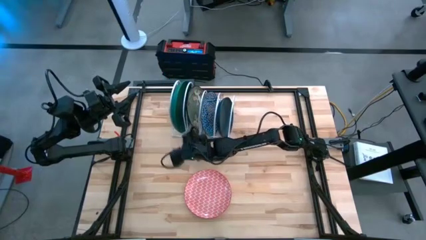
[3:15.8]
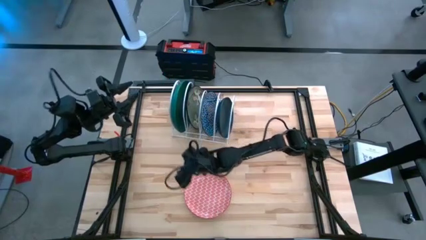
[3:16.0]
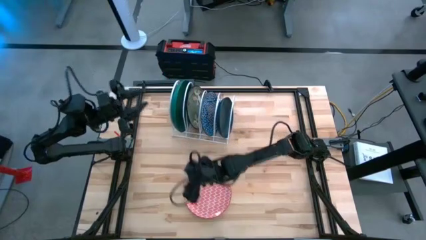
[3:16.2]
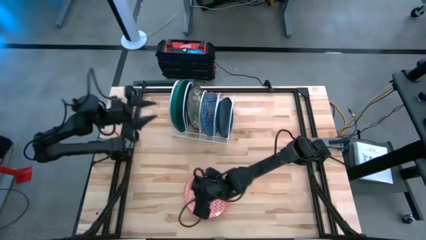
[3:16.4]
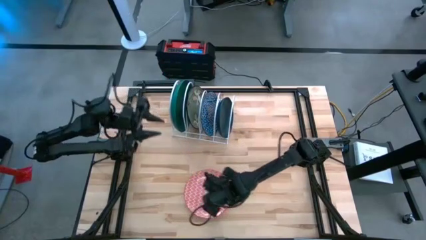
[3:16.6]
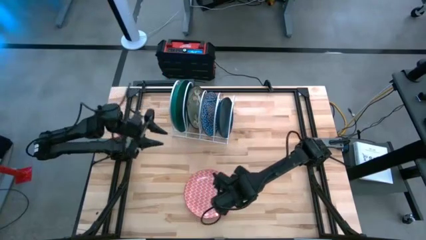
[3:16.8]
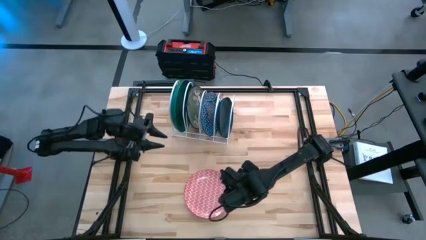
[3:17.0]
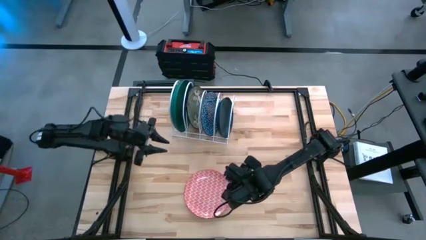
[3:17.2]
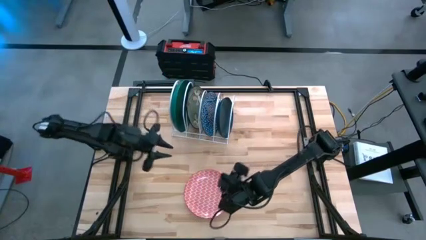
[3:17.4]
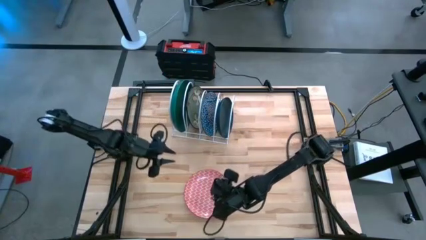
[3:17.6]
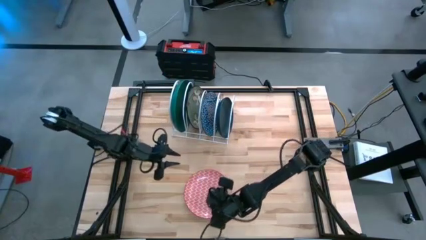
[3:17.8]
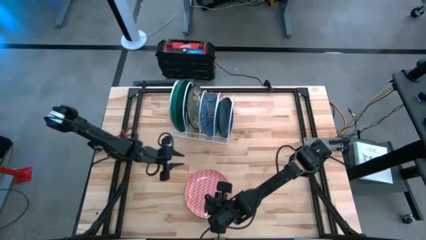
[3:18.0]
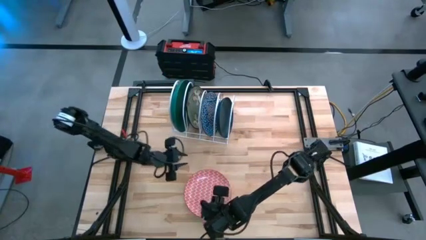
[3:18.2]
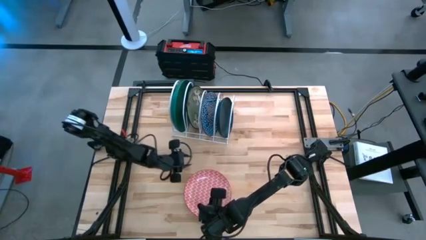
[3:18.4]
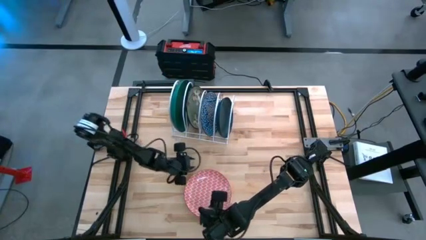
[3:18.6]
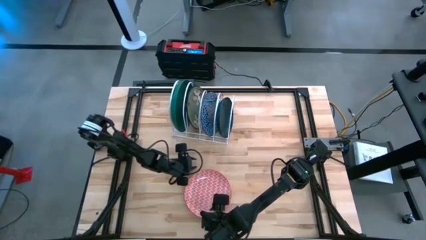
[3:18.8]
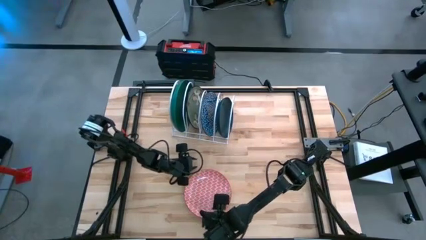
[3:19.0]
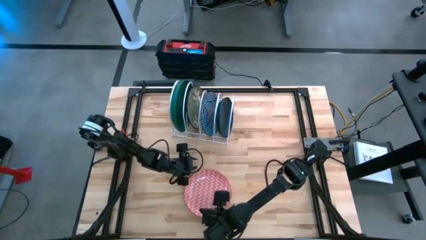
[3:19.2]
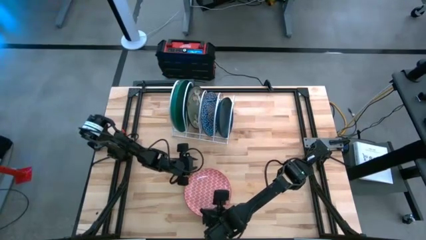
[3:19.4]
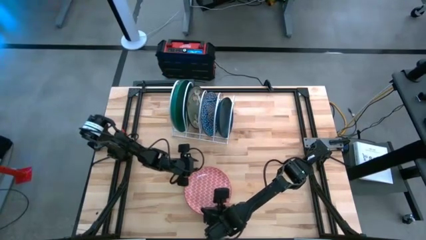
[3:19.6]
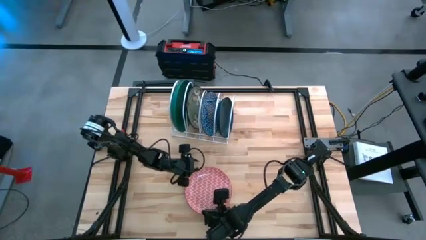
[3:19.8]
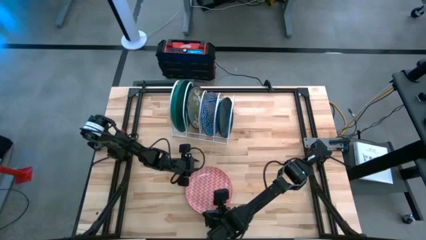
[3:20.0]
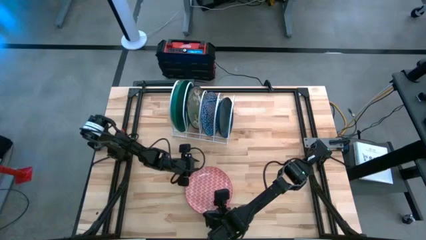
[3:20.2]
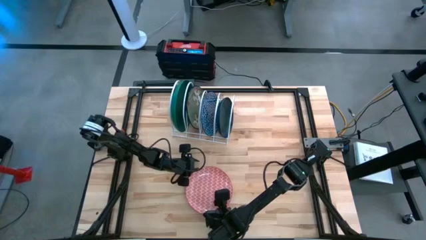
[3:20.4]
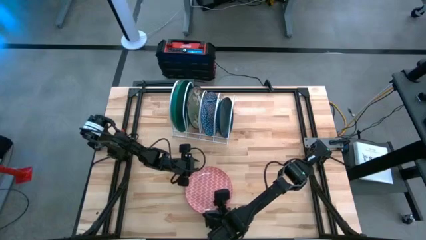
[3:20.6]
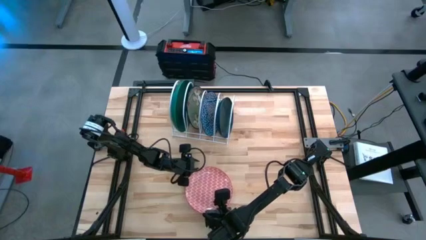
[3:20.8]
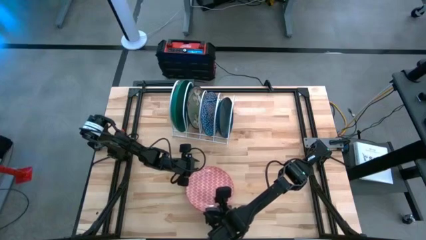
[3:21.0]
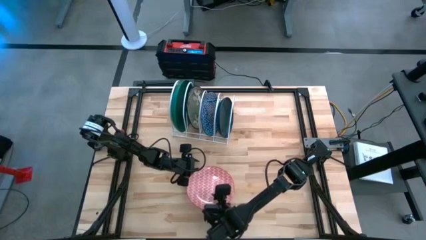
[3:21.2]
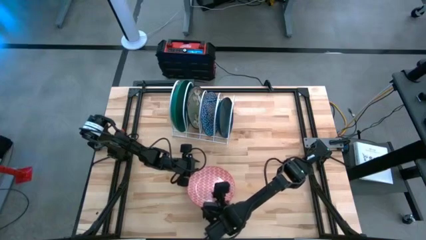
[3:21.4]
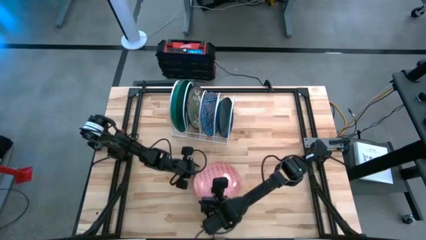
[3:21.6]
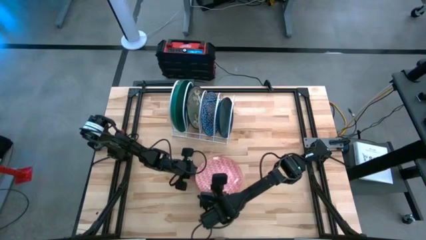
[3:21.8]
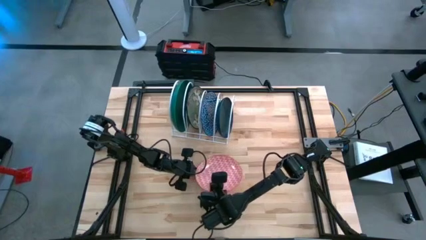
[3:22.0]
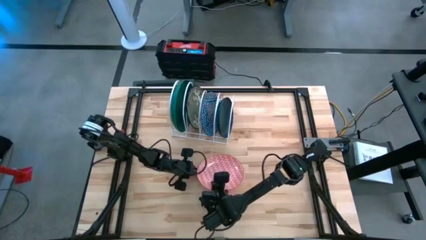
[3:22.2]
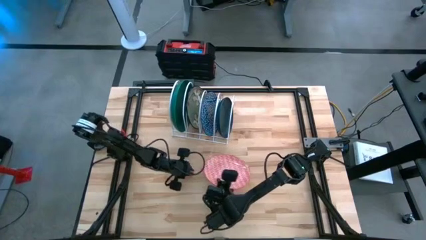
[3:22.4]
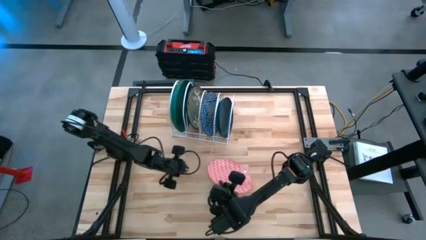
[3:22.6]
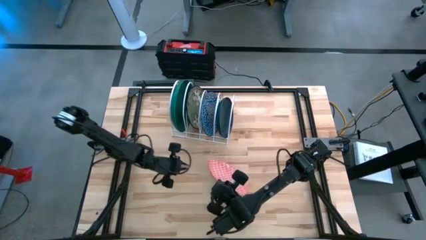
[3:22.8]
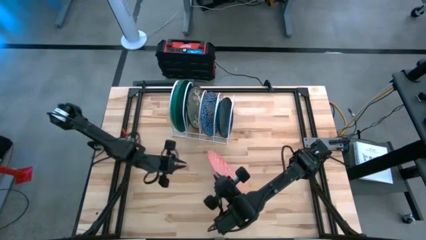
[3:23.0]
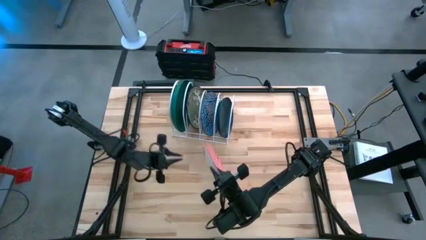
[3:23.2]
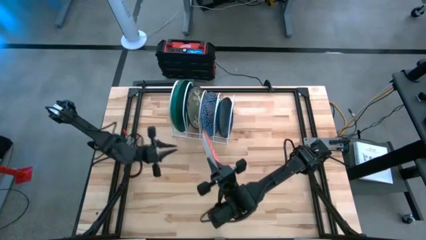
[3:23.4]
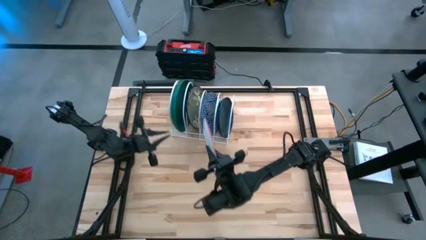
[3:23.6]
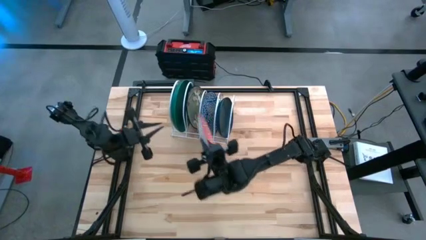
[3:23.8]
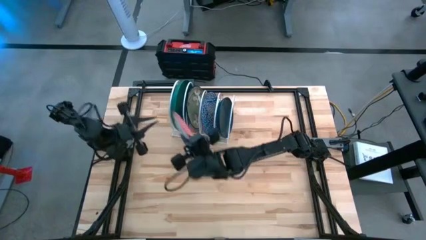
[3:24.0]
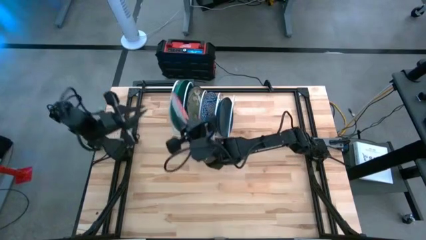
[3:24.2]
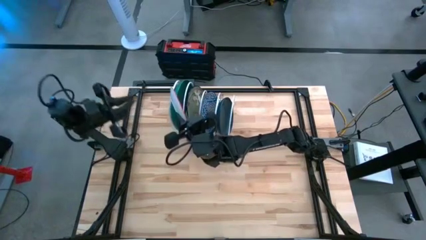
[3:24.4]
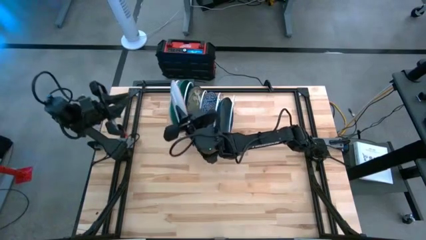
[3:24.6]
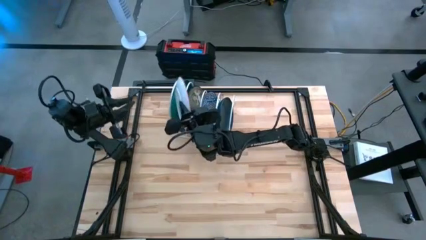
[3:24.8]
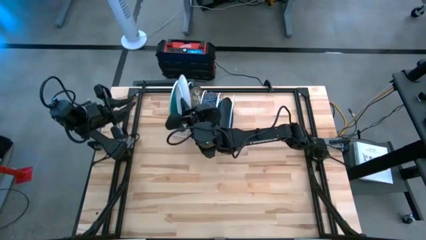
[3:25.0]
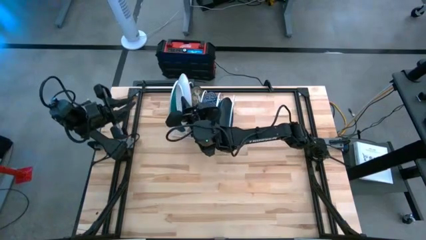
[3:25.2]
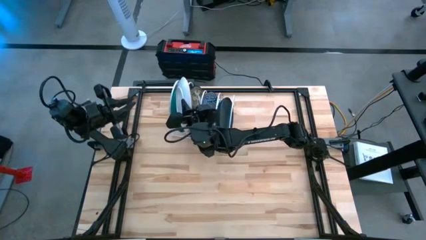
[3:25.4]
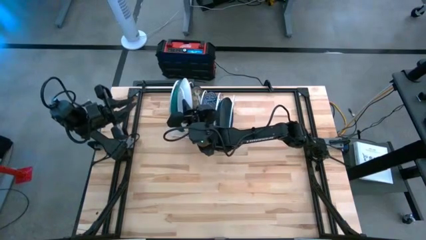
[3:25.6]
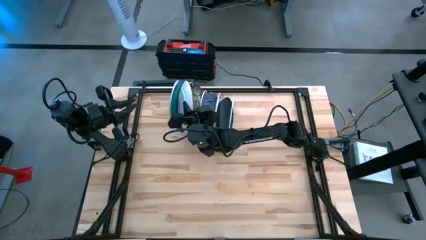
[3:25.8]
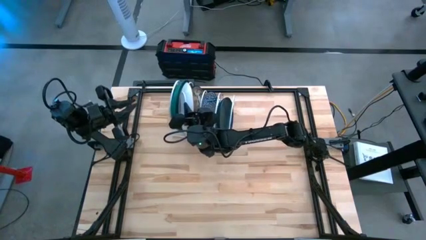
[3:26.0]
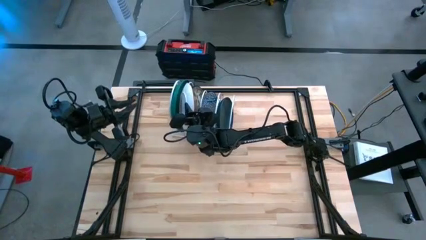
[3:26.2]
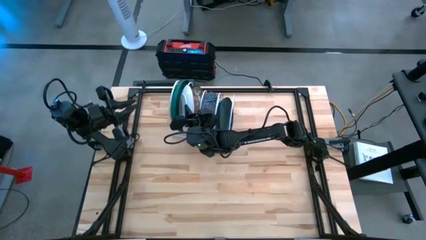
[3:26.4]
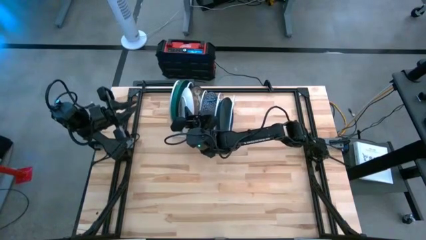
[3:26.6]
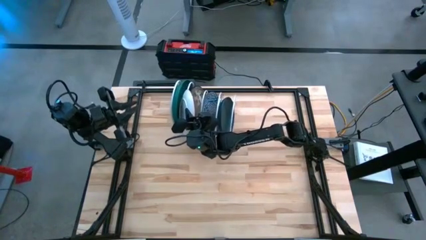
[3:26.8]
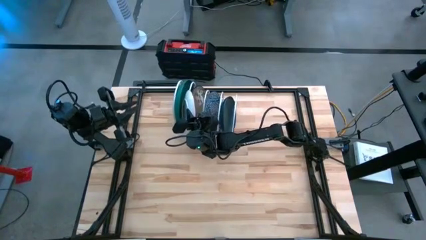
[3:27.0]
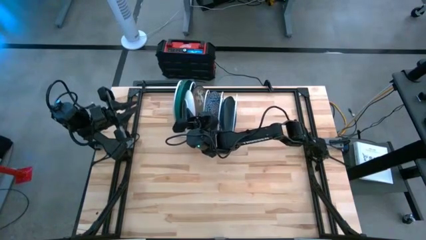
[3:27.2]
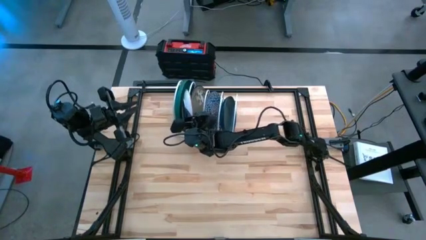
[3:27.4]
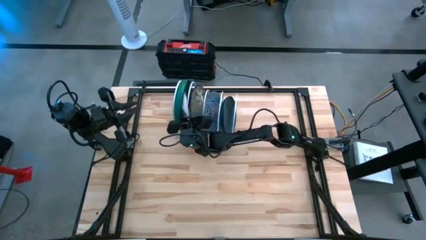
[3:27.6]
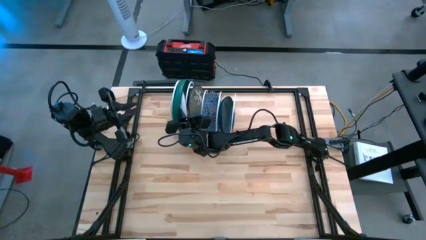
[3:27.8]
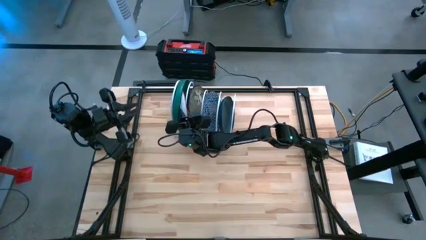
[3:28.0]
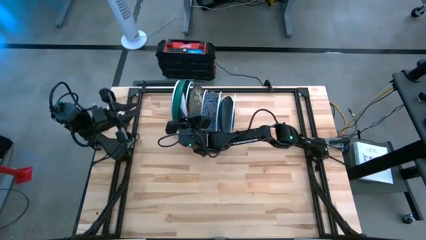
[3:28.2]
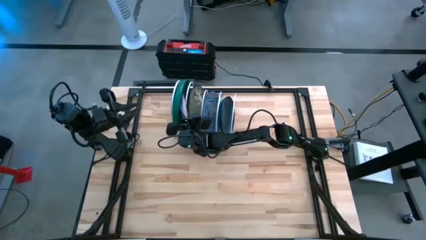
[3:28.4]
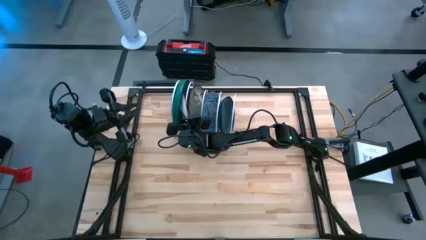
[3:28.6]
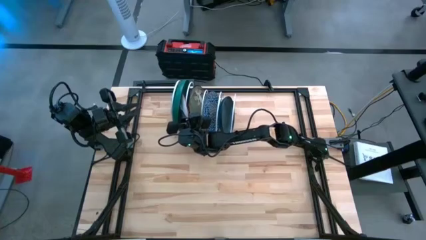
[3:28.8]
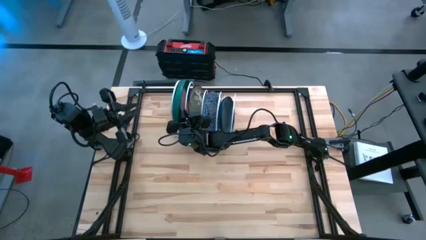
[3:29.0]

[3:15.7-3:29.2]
Task: Sort dishes
Put the orange patterned plate into the dish rack

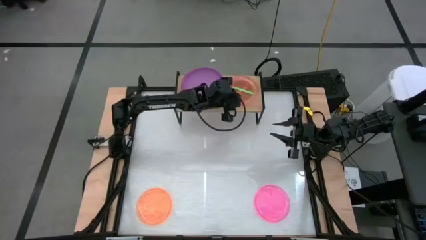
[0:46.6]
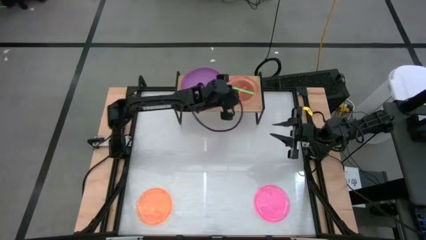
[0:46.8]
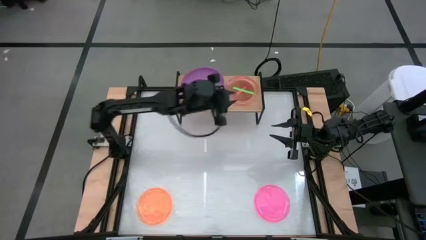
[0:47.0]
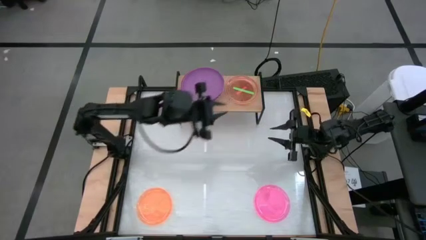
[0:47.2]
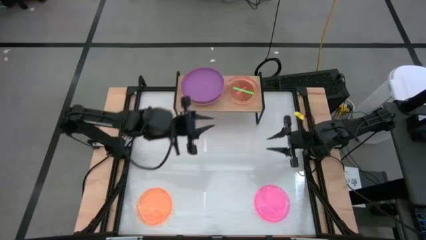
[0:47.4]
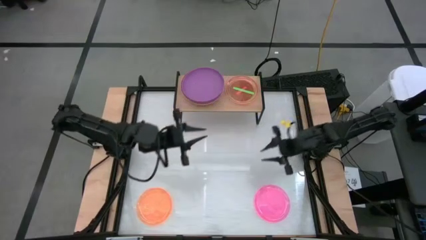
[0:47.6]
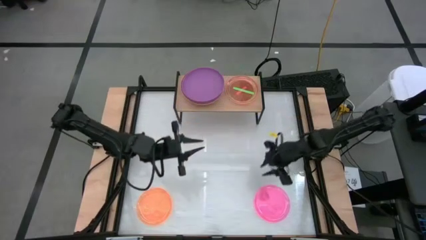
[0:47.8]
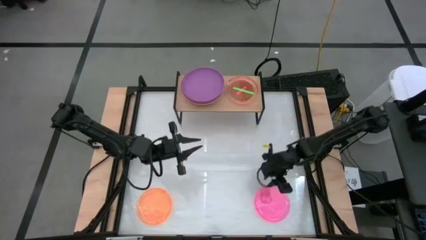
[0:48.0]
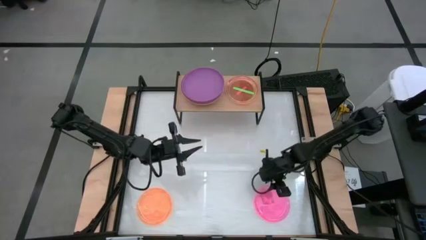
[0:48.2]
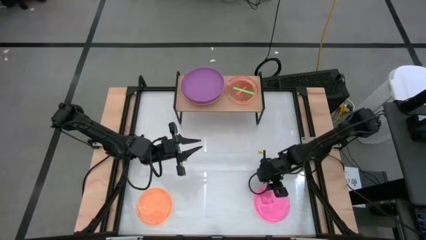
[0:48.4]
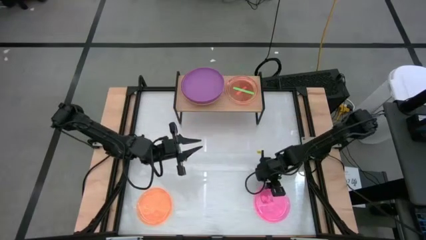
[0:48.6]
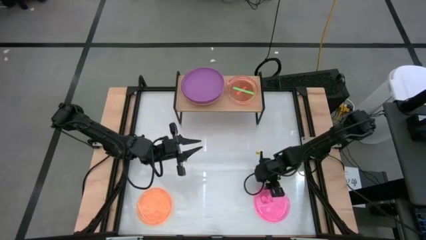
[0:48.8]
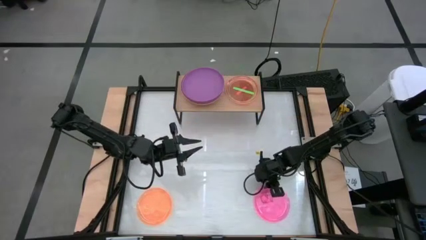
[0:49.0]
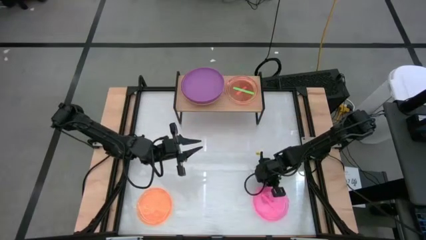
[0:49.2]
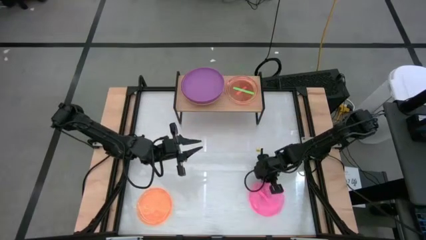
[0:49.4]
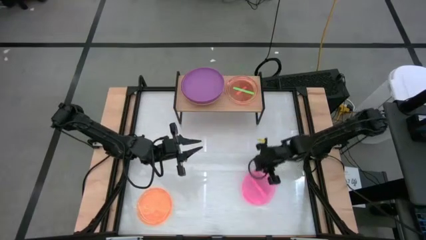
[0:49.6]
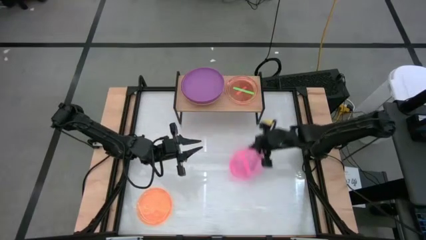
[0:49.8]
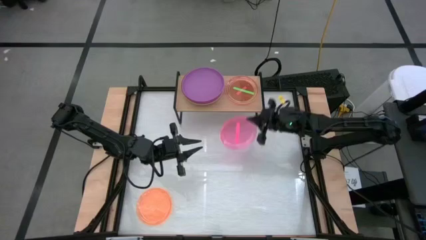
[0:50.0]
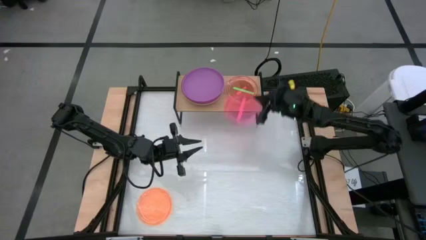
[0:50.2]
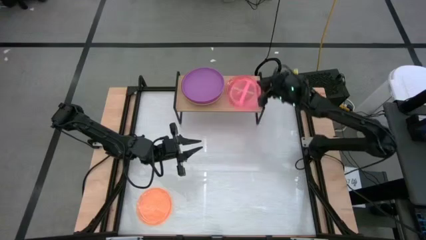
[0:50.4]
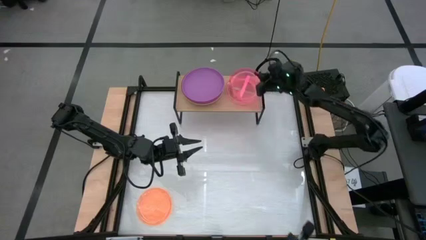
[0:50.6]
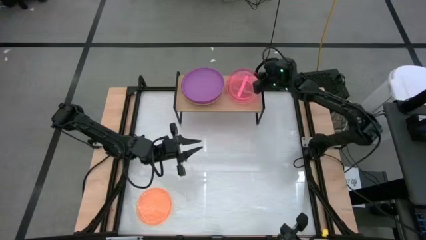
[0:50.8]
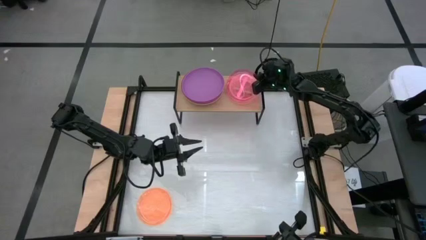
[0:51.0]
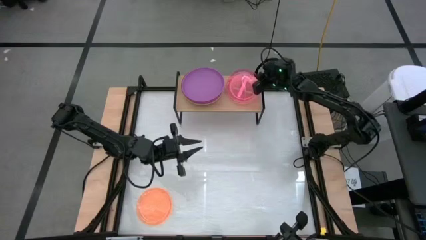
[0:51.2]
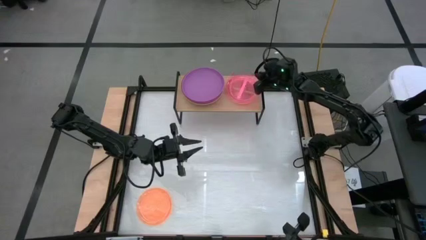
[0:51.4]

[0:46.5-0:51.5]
Task: Place and stack plates onto a shelf
Stack the light pink plate on top of the light green plate on the shelf
